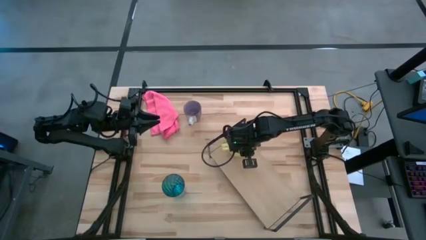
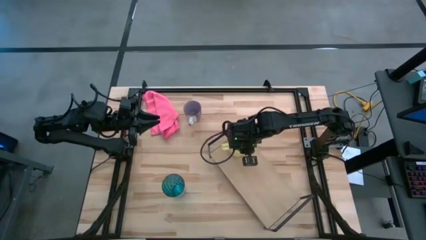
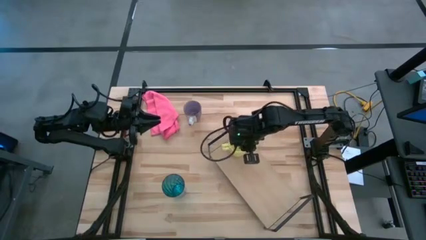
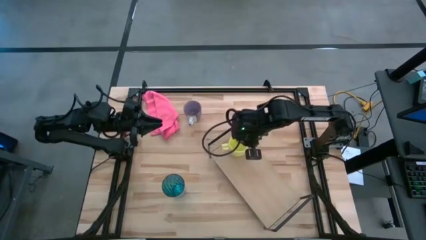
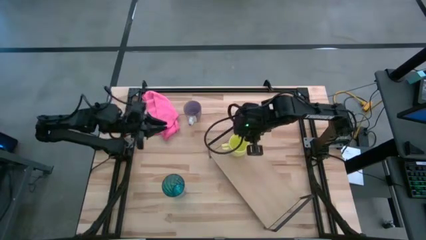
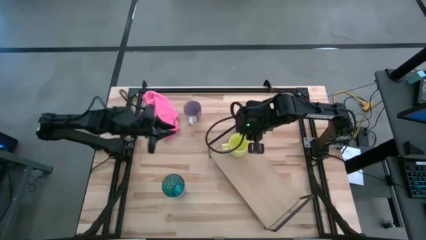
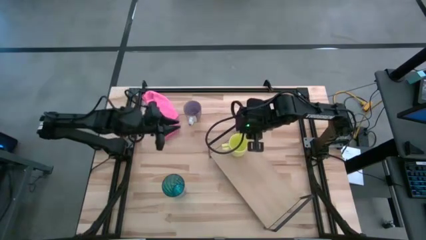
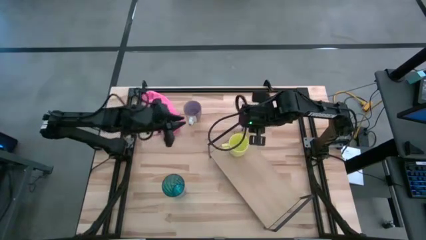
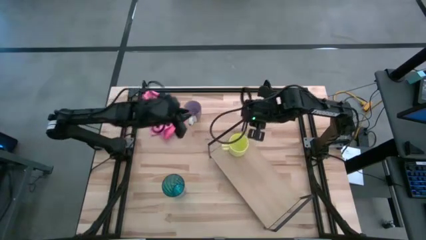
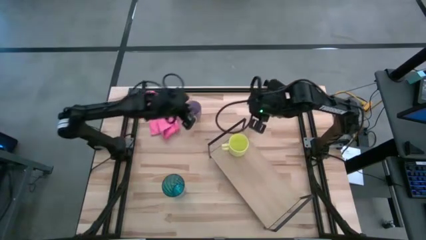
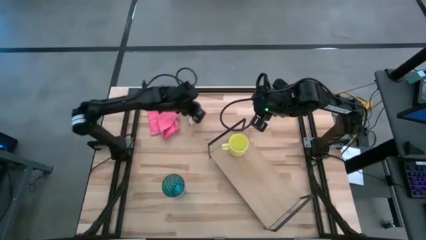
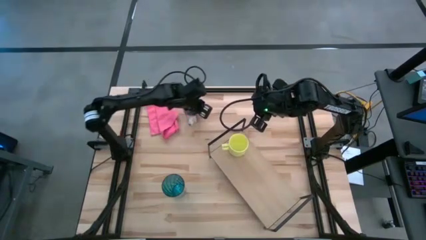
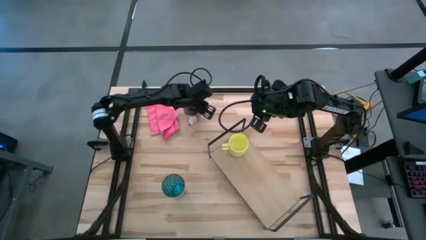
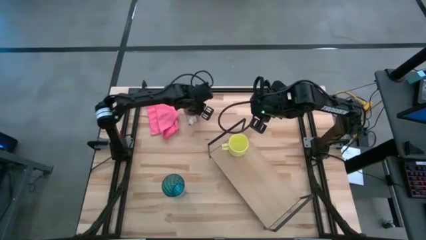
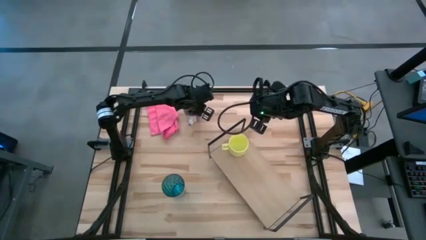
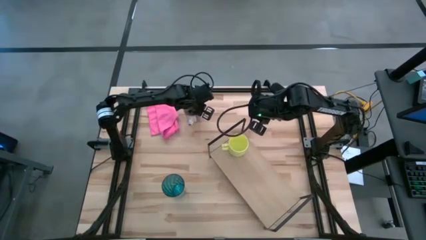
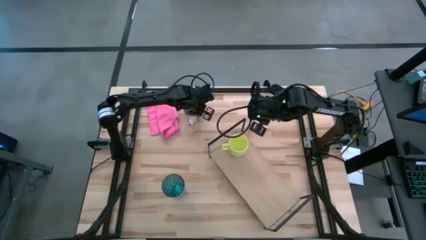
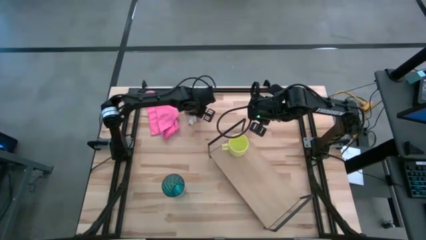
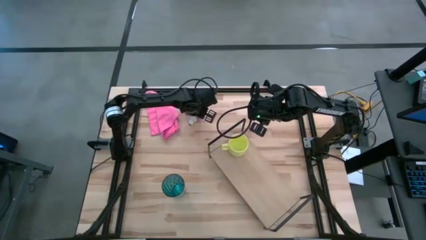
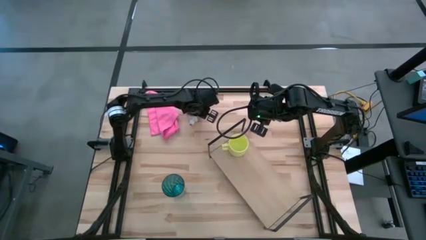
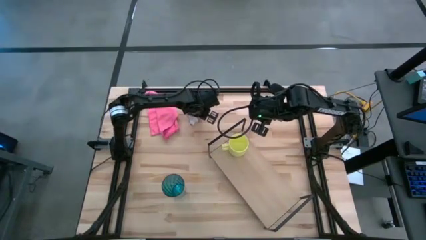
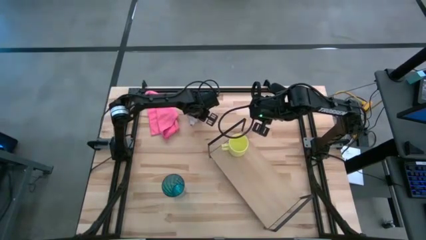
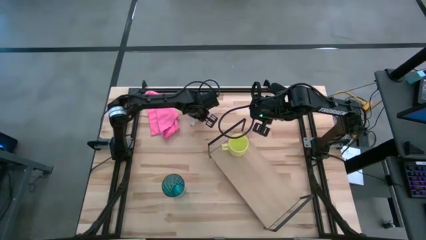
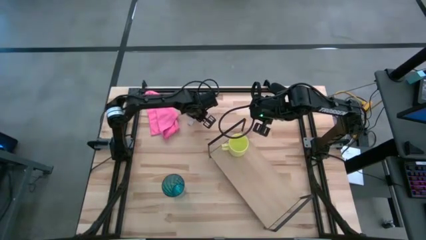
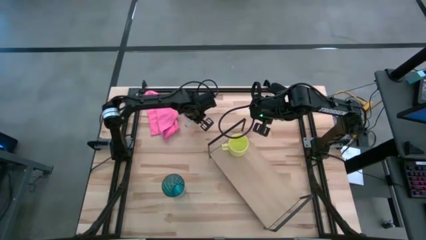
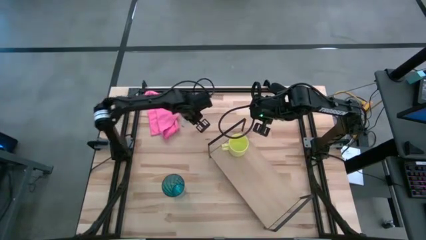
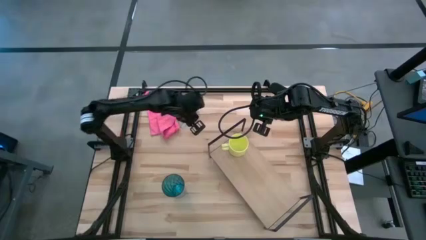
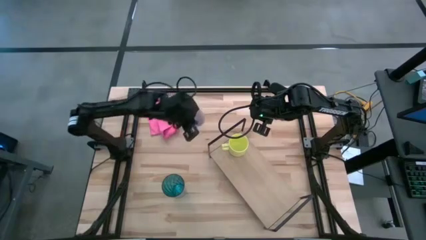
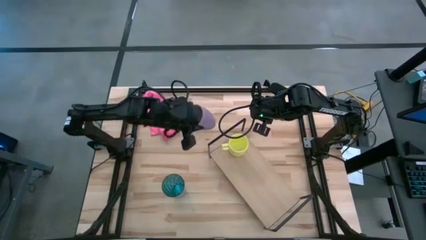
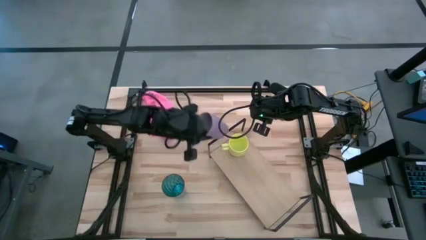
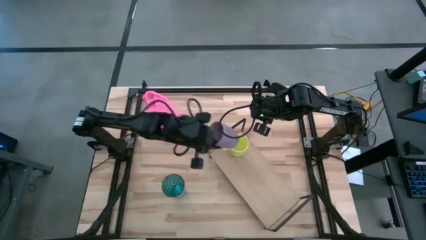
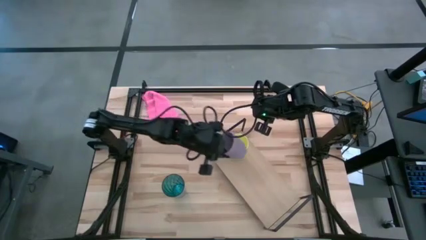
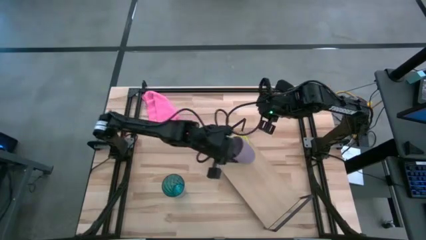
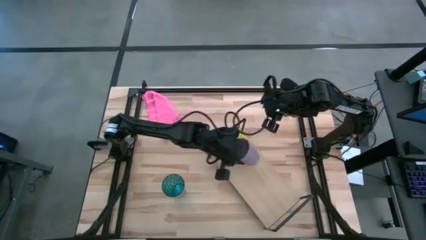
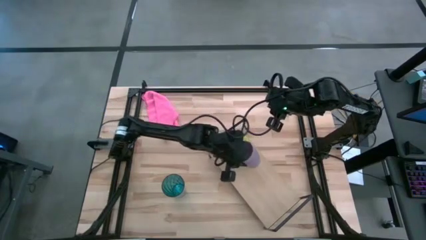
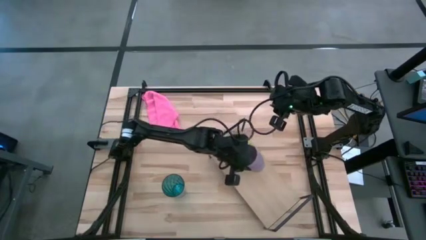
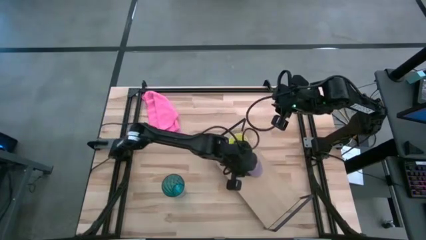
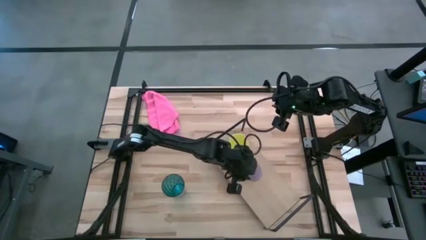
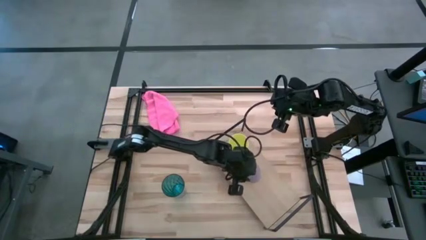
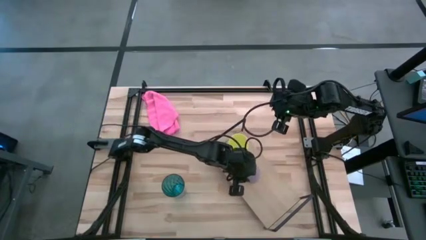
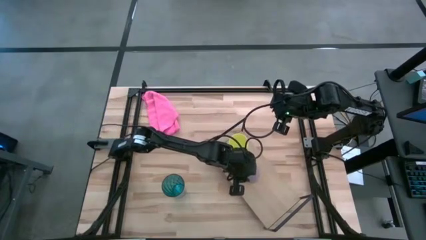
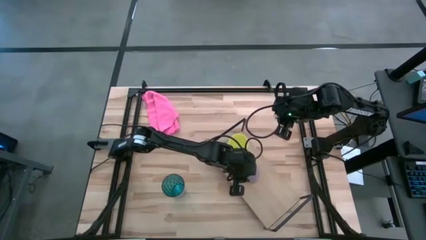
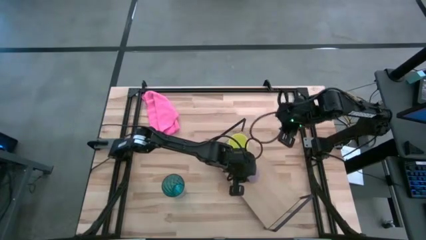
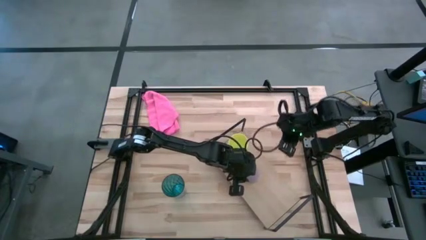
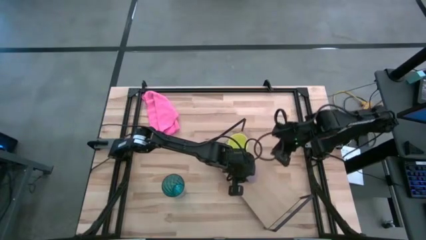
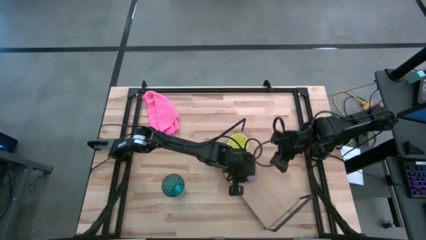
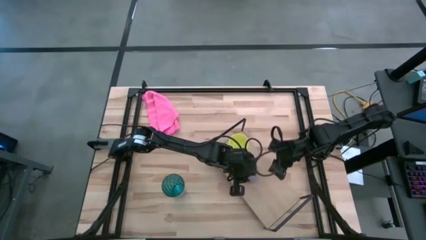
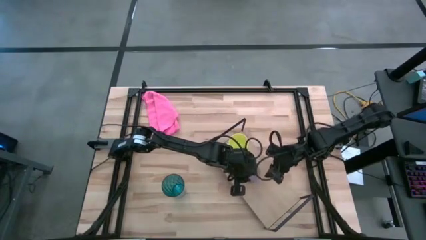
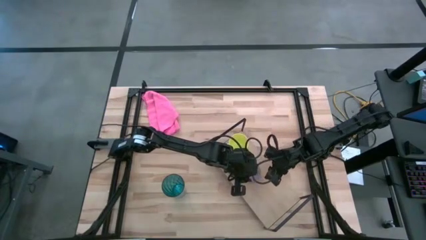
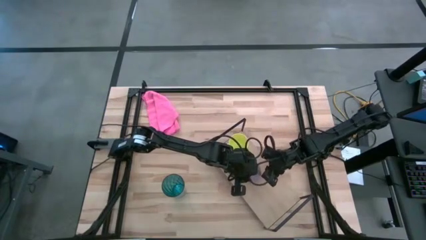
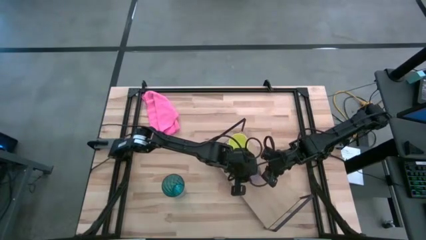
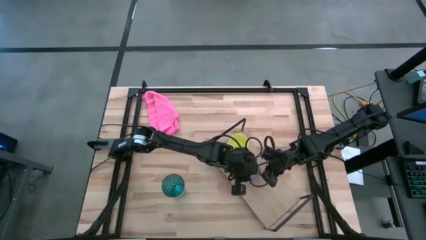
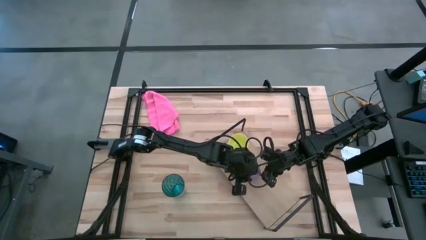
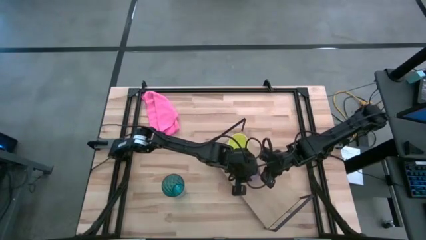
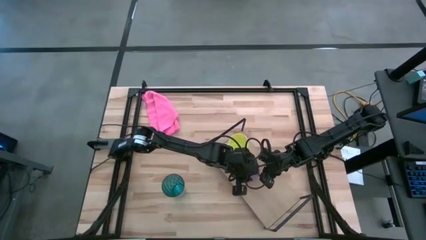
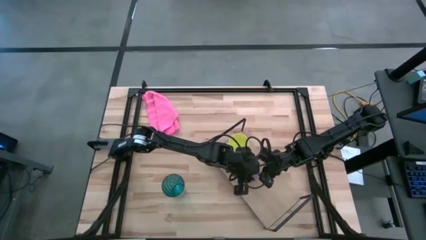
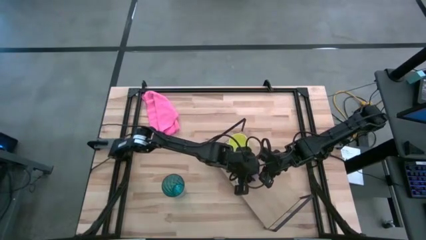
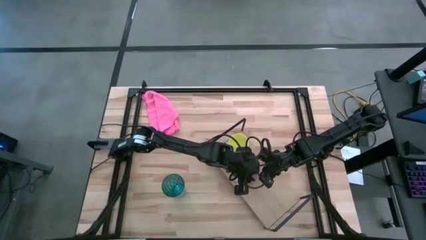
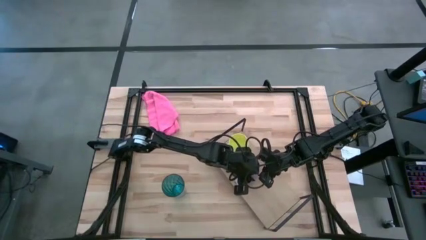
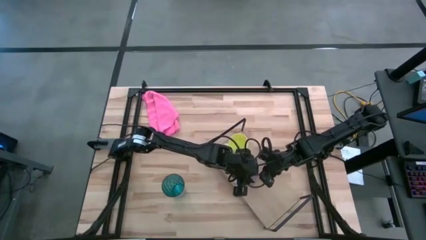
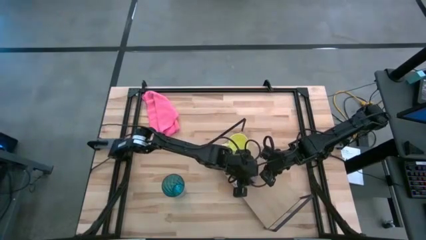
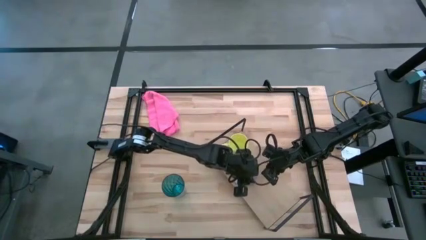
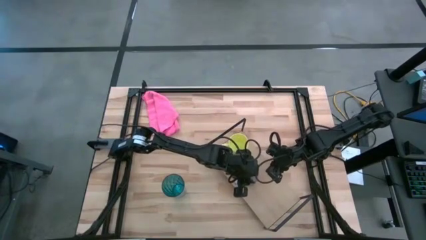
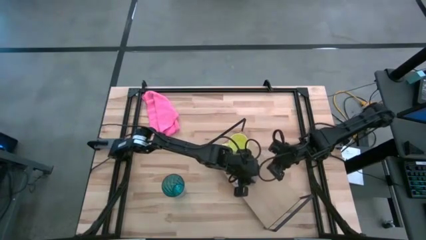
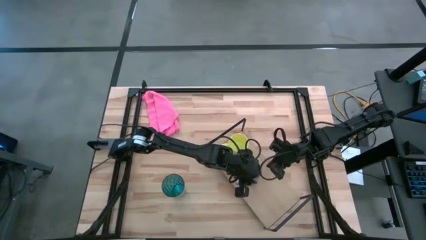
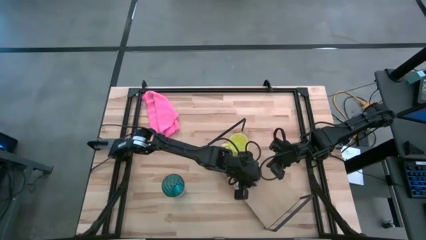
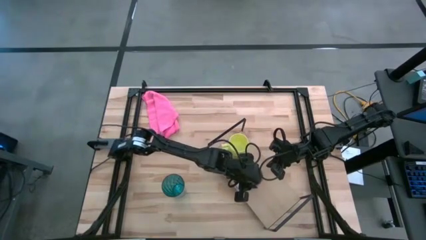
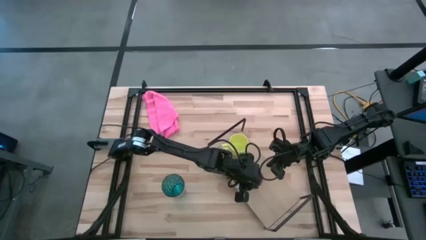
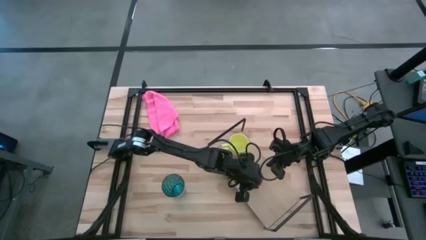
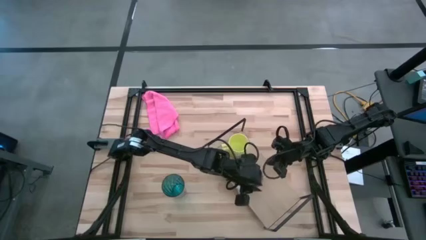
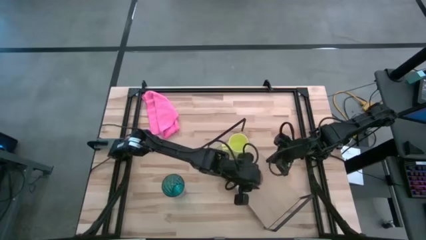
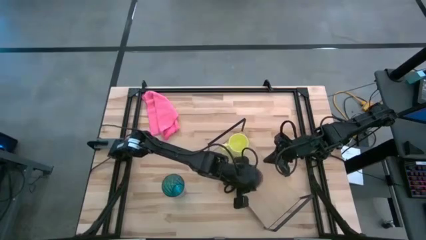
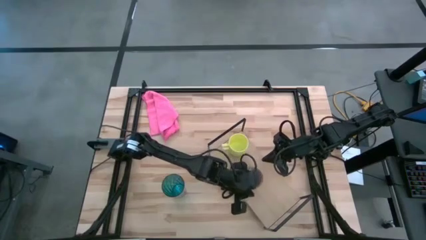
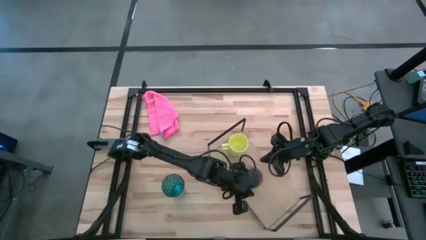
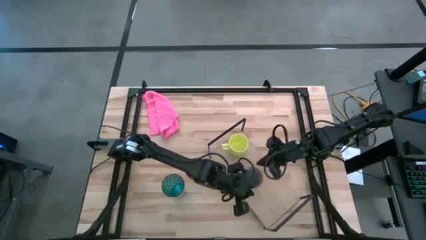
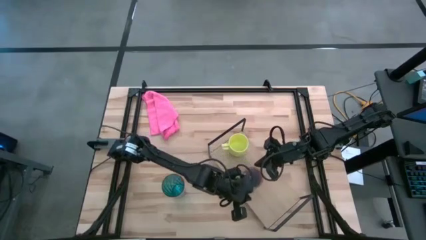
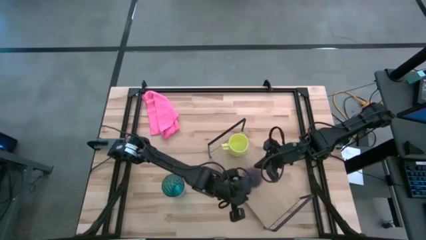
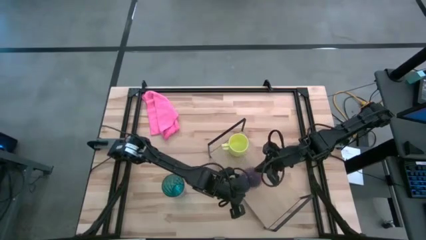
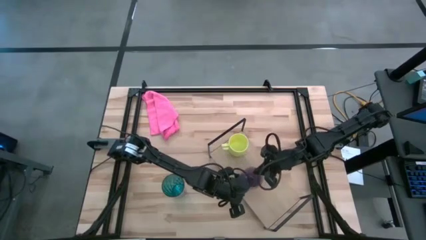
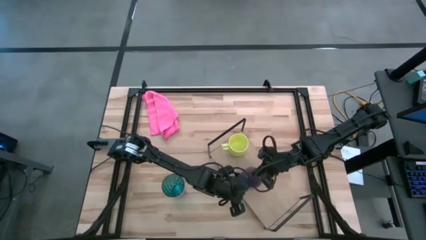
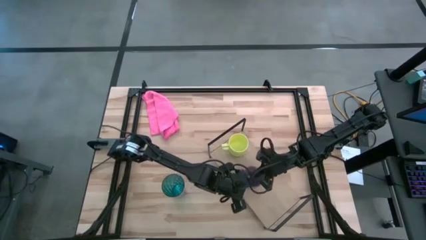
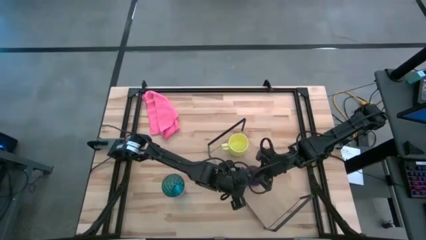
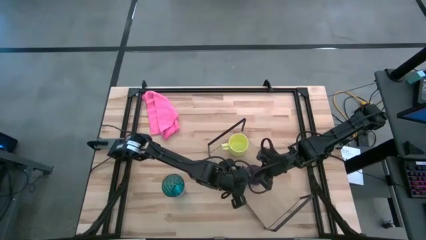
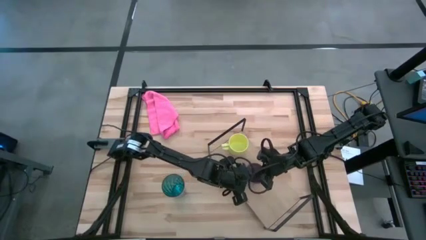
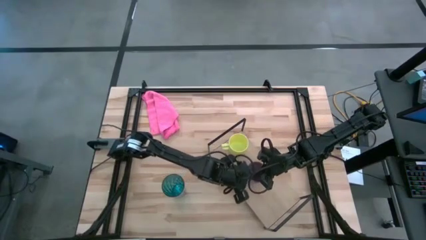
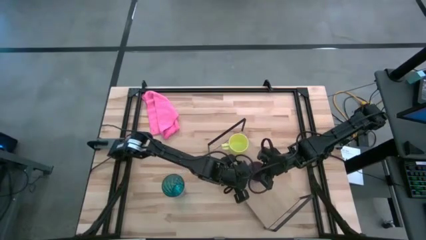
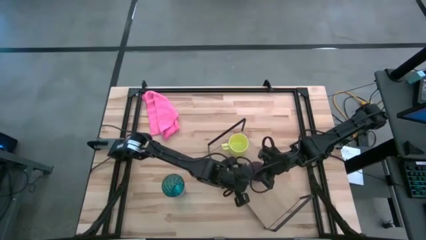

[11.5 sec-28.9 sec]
Task: Stack small to large cups/mugs on shelf
Put the violet mug on the shelf
